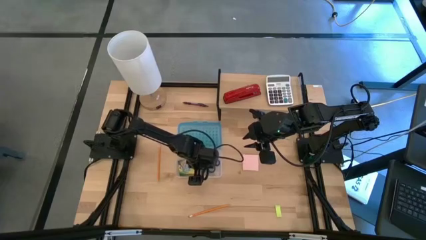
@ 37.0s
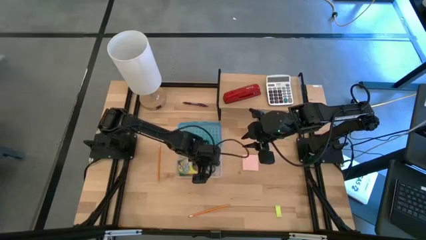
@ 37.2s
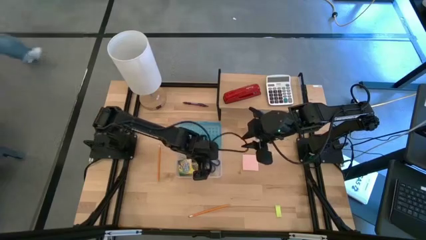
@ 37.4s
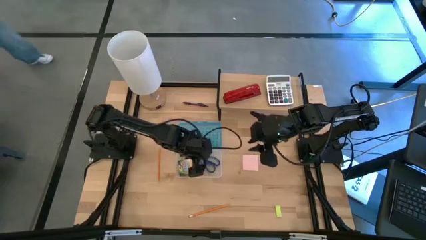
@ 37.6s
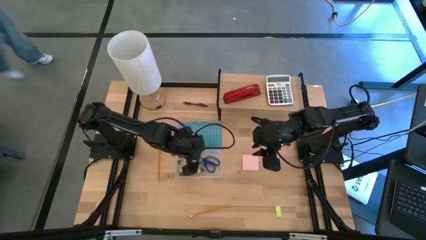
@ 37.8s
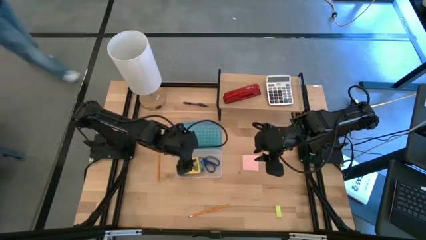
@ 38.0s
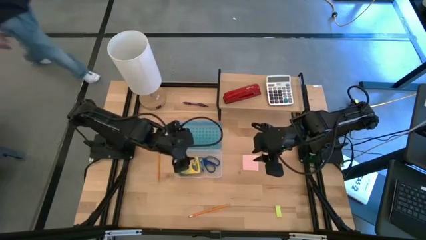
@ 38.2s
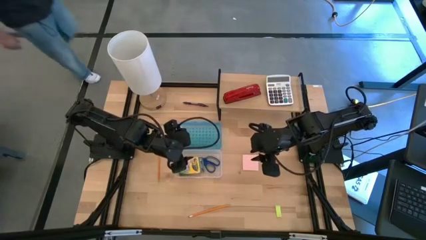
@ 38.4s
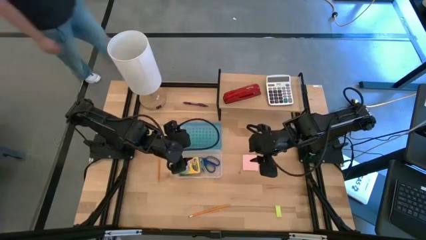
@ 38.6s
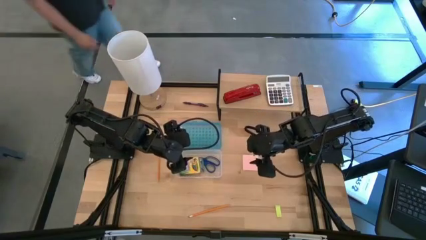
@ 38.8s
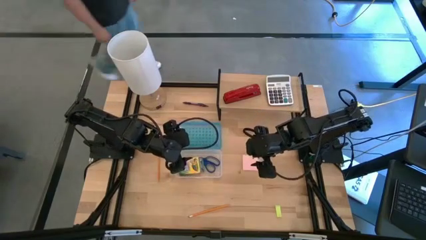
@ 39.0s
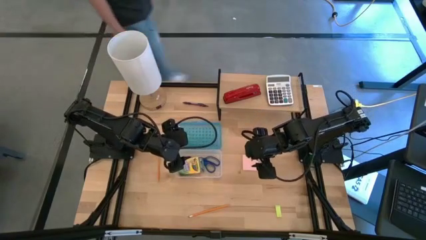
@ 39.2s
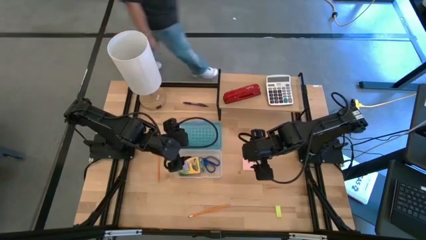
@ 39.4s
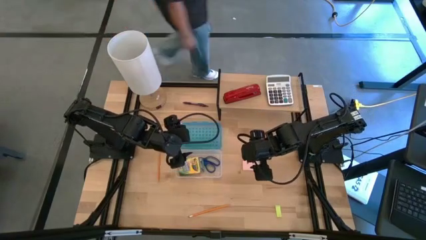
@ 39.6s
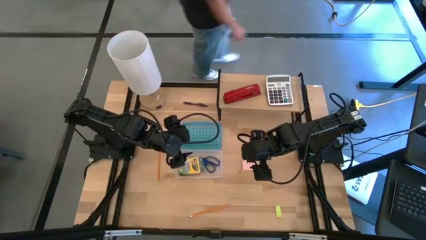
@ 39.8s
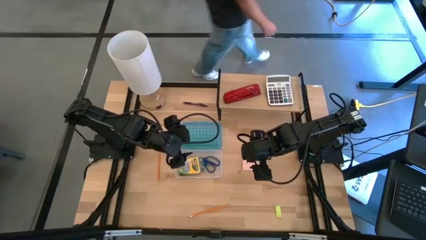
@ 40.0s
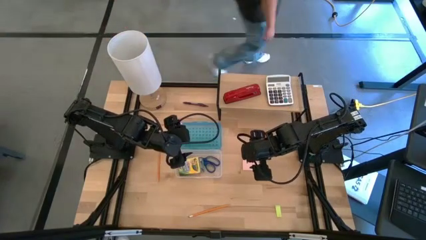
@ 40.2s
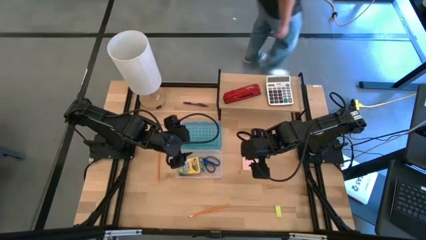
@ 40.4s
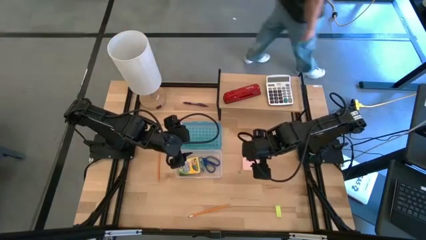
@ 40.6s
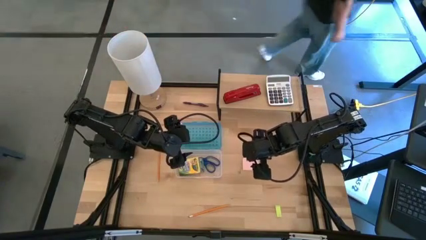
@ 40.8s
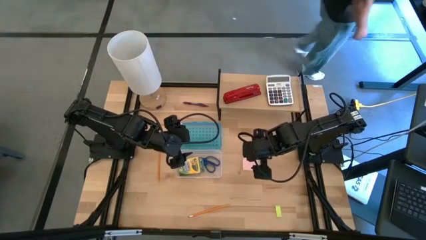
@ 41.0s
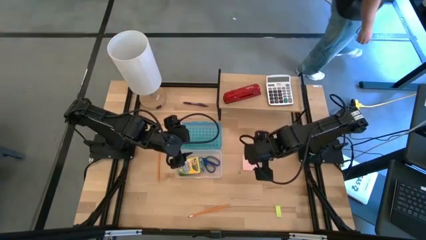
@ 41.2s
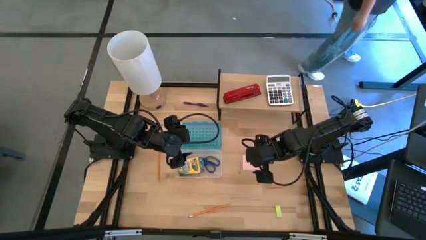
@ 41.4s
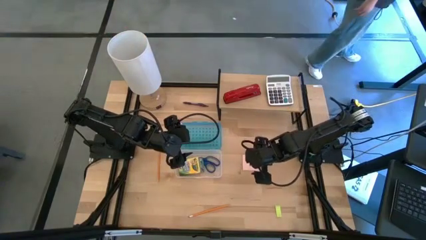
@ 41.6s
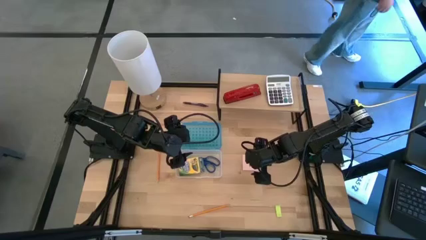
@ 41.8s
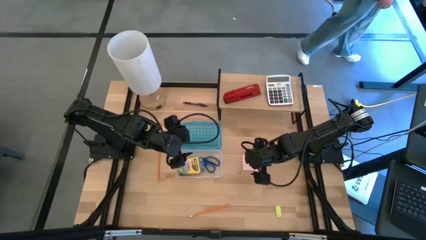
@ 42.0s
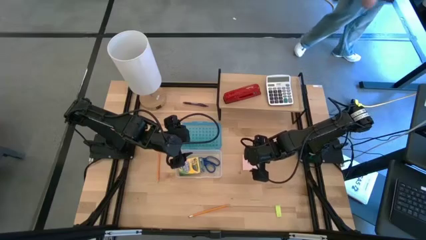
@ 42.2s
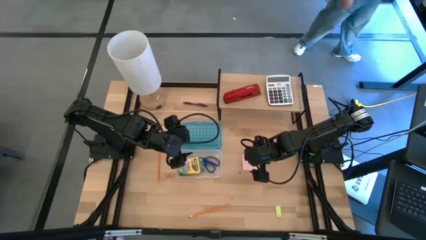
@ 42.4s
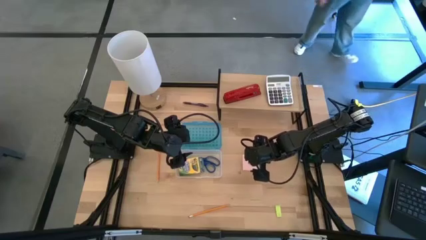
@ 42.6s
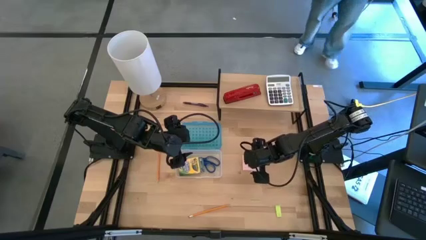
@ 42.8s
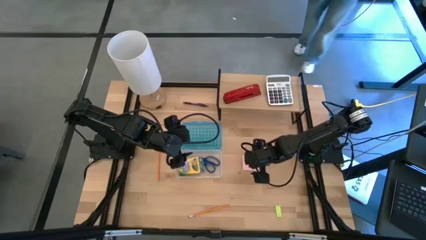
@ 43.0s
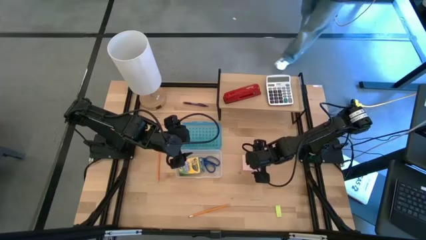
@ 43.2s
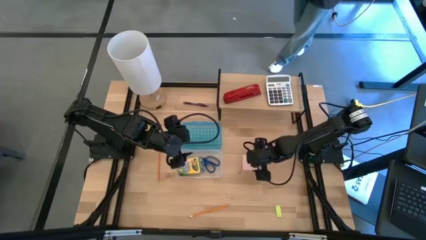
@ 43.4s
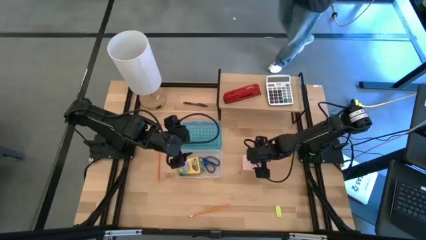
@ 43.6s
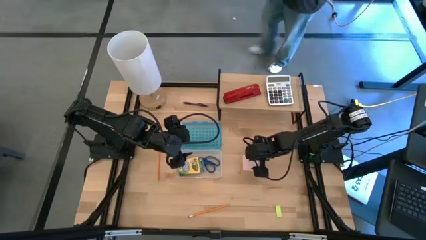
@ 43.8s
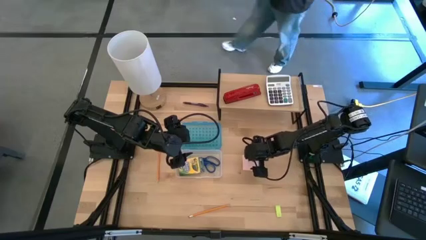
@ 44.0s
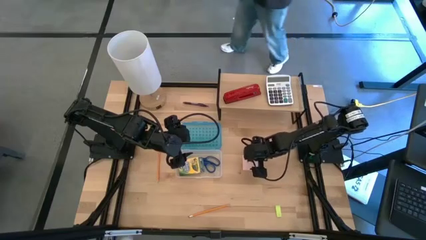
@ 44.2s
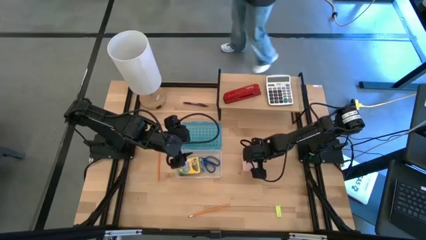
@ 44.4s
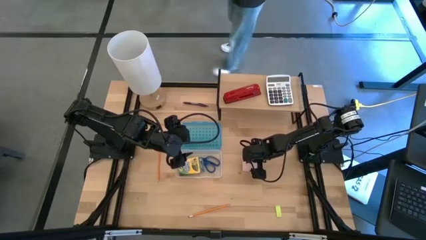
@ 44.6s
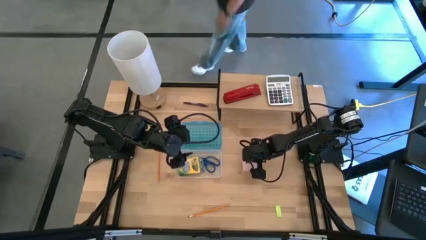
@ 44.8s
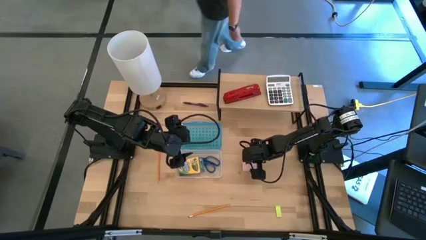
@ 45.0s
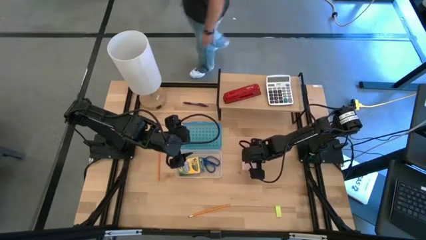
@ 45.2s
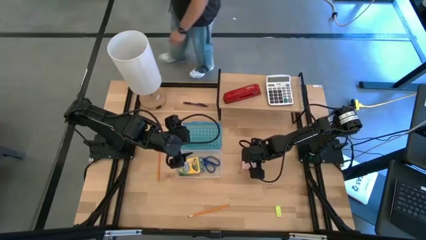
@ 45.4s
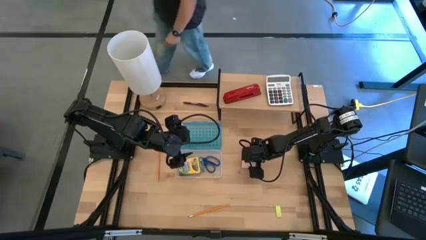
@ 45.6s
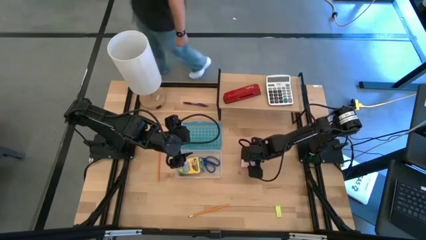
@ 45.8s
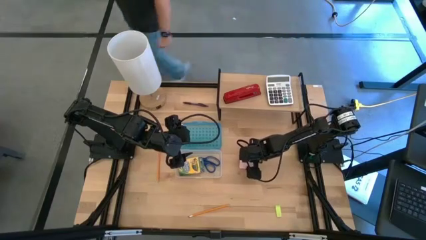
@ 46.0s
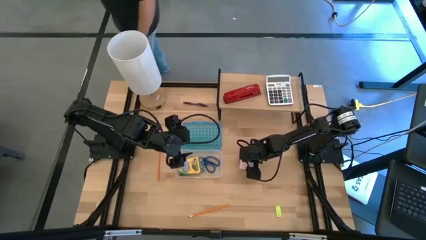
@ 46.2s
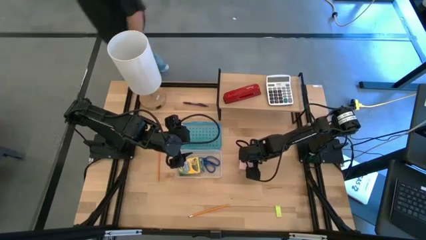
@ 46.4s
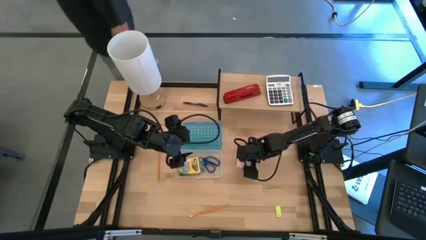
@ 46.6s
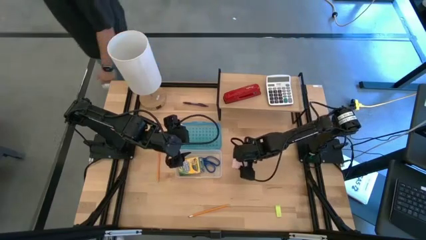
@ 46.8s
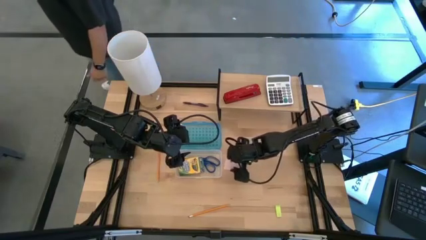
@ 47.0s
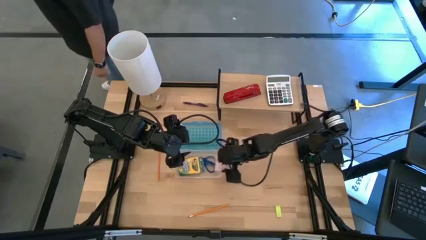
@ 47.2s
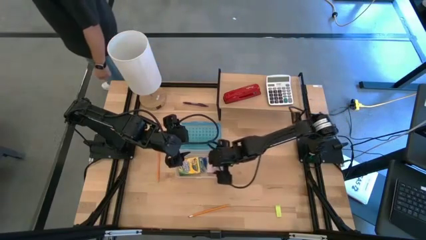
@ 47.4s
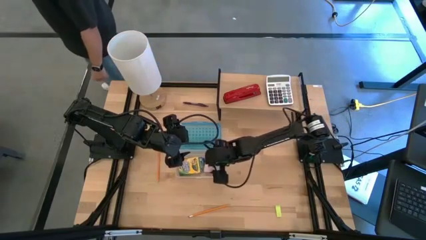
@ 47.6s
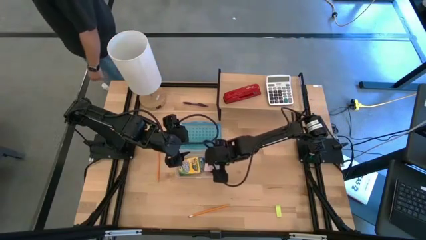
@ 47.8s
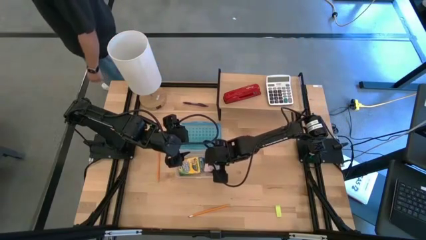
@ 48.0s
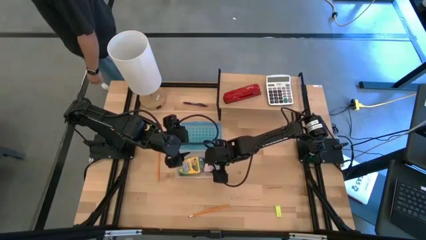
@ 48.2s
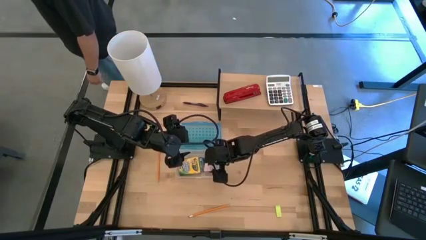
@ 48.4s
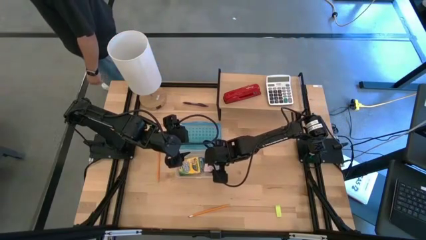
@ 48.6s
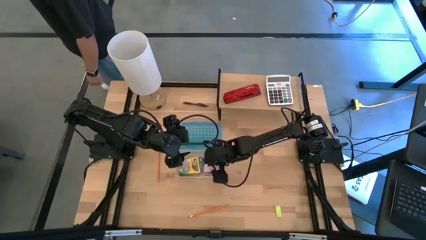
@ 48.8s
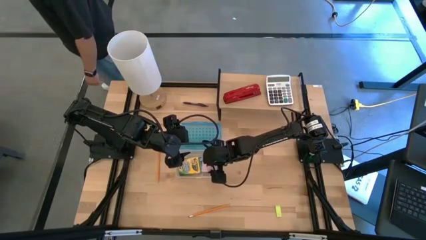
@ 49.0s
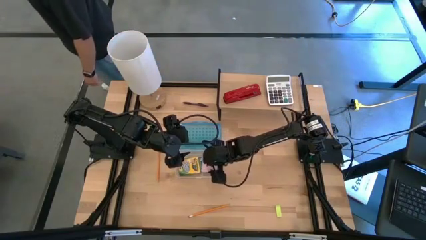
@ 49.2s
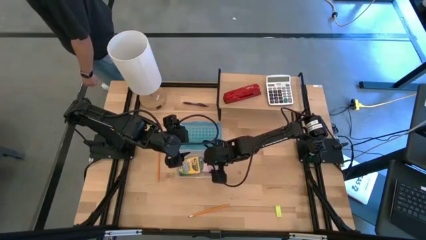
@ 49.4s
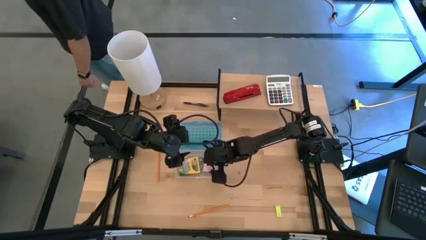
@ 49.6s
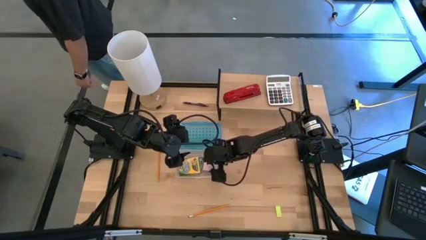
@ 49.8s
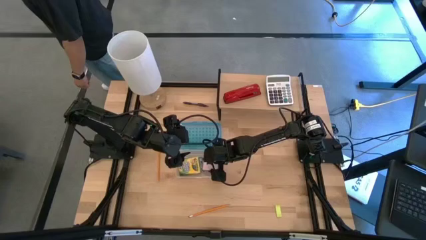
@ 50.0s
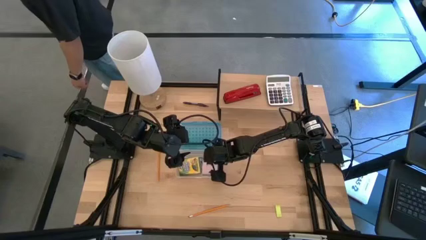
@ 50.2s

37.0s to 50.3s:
Task: Pack school essentials
Put the pink sticky notes into the blue supply box

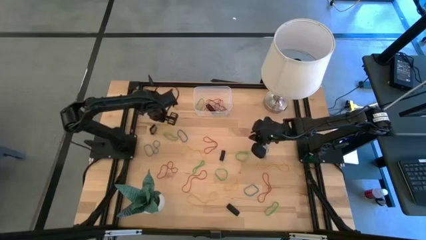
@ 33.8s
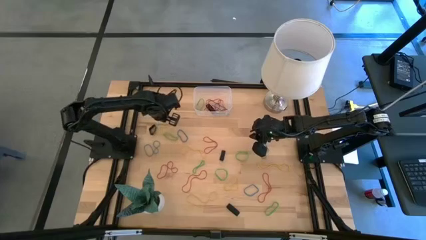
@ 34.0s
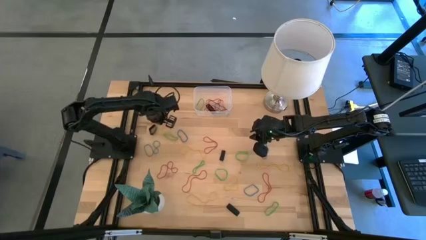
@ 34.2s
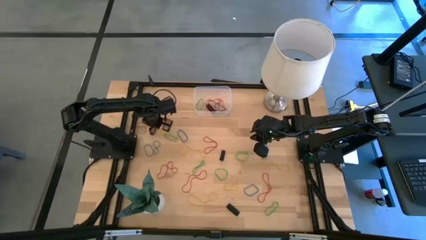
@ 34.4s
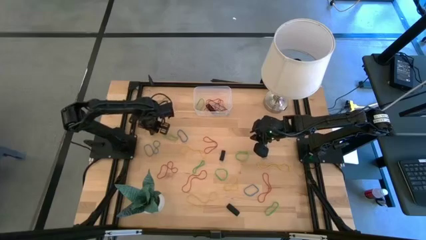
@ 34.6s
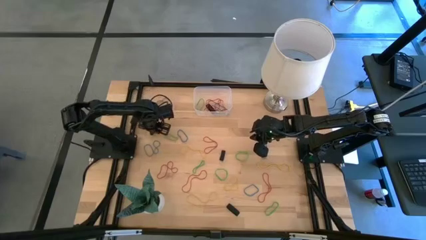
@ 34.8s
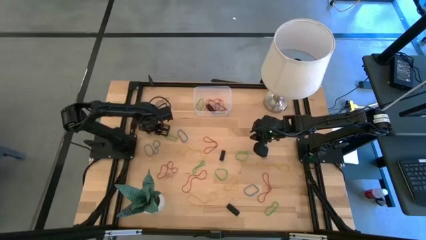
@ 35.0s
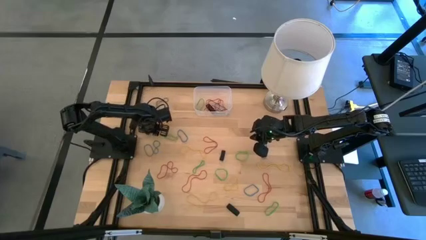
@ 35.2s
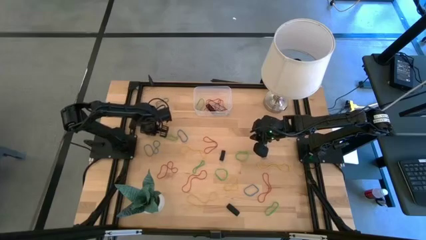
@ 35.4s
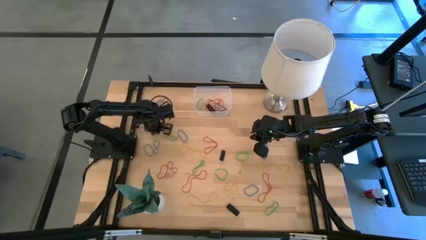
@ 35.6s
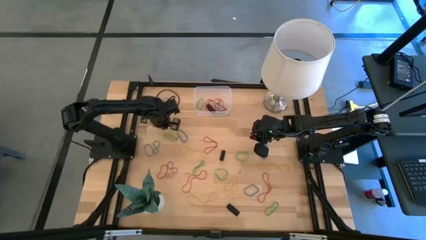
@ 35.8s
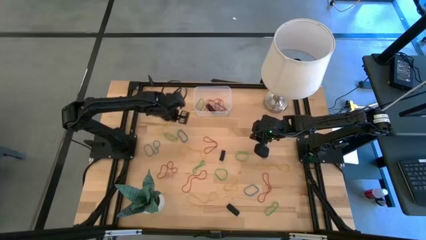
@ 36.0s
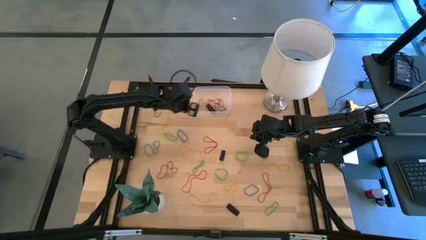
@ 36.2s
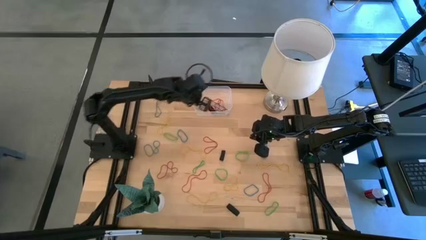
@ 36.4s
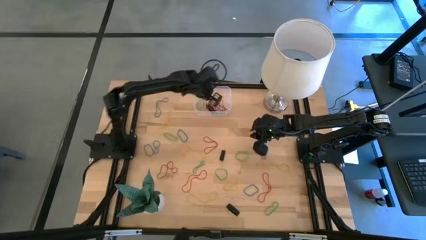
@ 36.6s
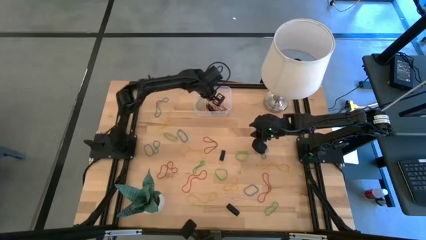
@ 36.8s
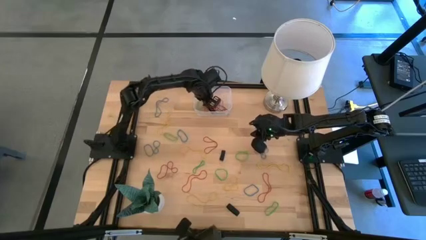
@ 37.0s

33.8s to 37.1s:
Task: Pick and place rubber bands into bin
Put the black rubber band into the transparent bin
